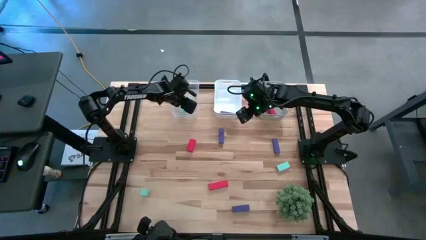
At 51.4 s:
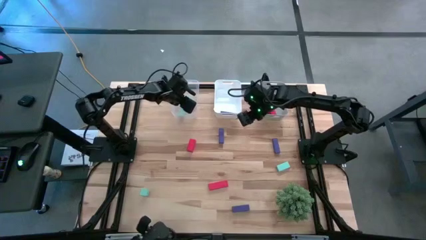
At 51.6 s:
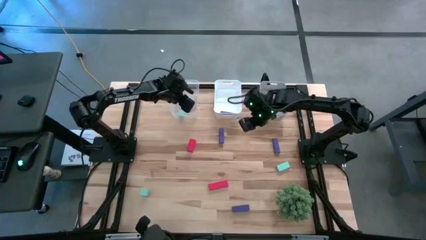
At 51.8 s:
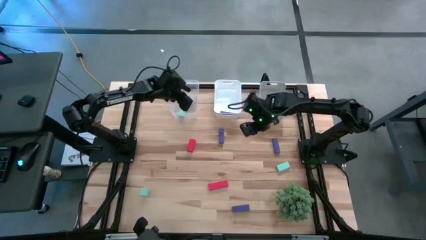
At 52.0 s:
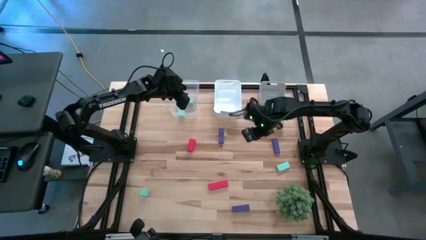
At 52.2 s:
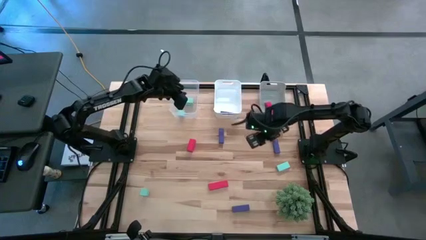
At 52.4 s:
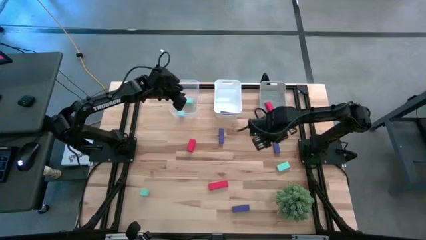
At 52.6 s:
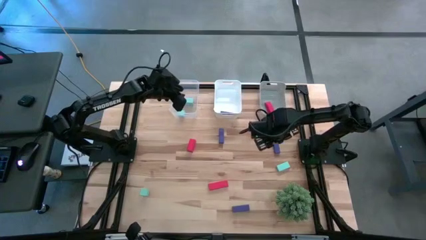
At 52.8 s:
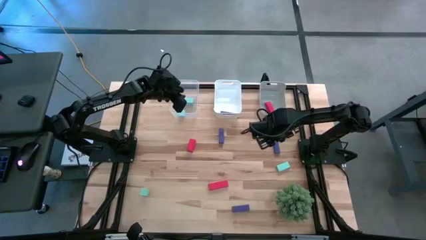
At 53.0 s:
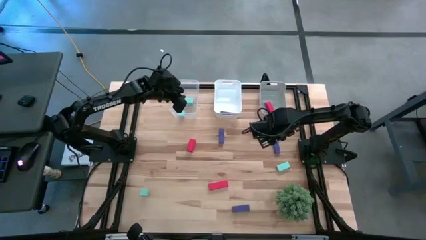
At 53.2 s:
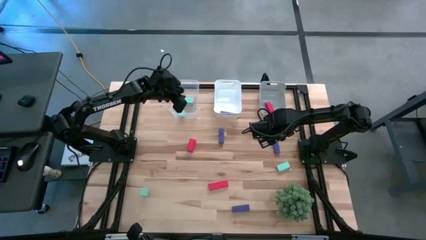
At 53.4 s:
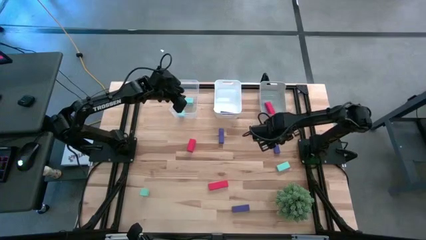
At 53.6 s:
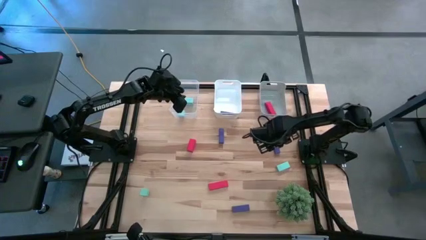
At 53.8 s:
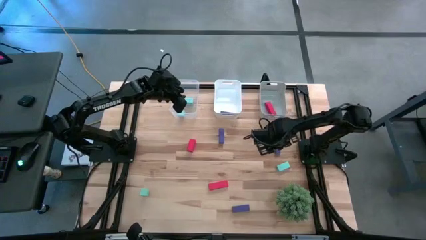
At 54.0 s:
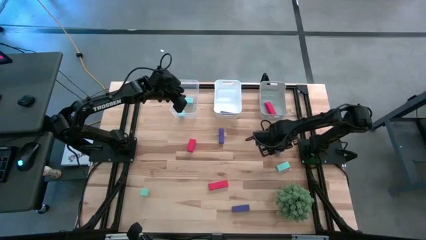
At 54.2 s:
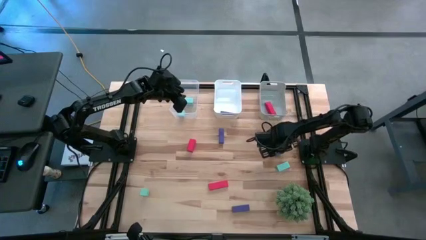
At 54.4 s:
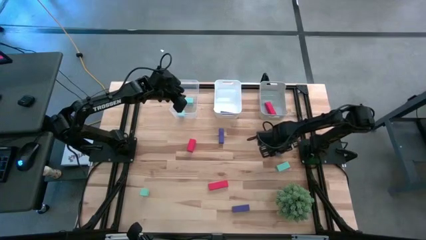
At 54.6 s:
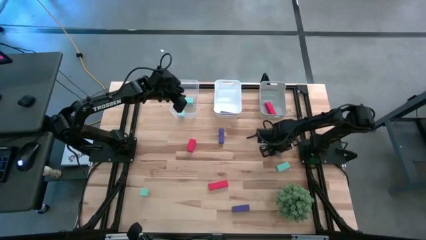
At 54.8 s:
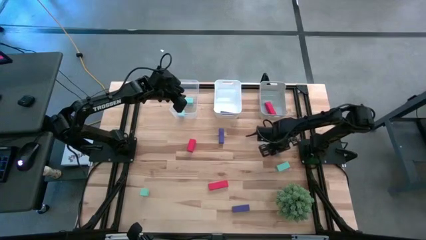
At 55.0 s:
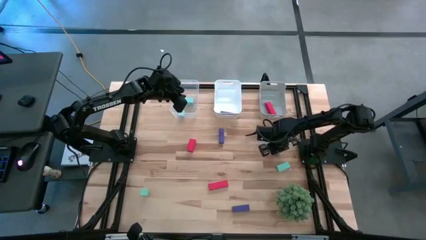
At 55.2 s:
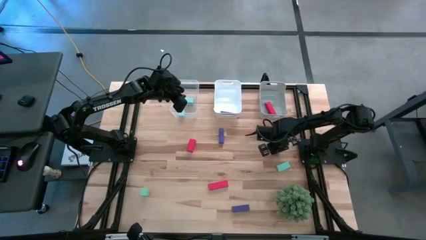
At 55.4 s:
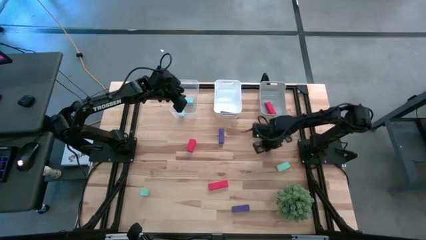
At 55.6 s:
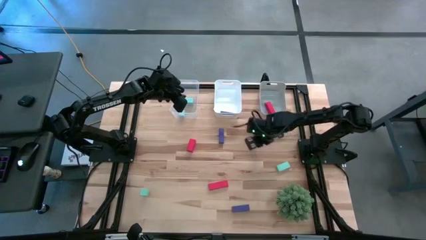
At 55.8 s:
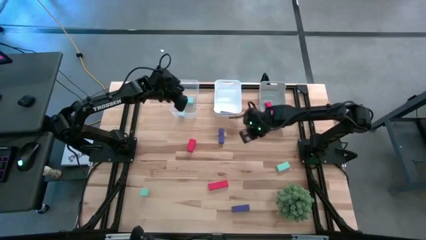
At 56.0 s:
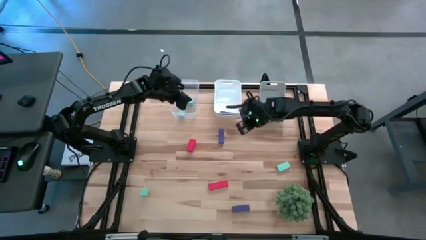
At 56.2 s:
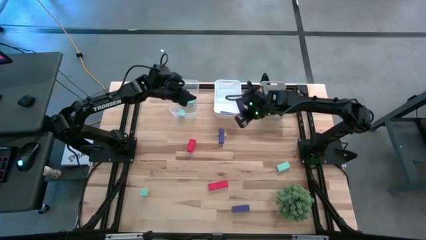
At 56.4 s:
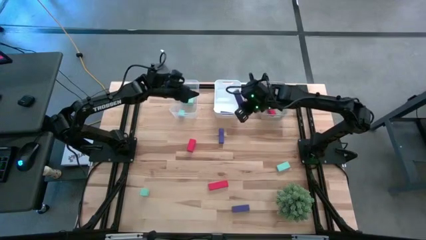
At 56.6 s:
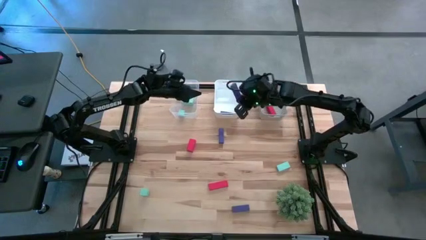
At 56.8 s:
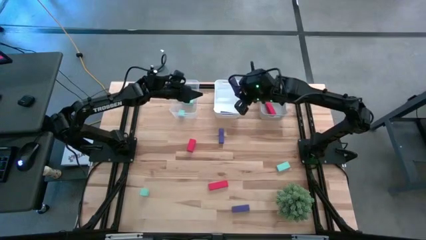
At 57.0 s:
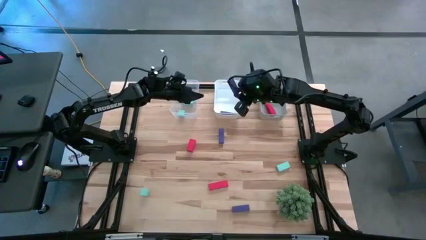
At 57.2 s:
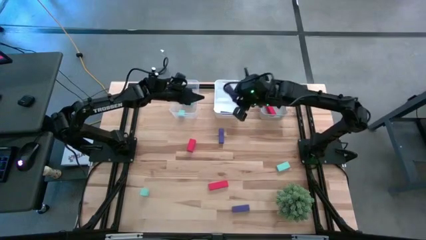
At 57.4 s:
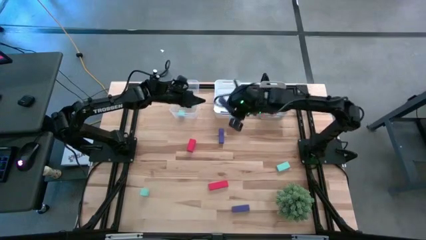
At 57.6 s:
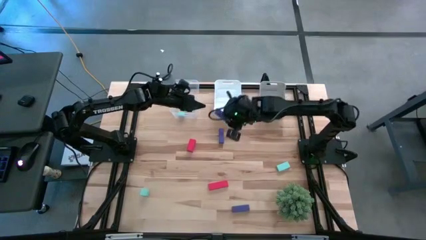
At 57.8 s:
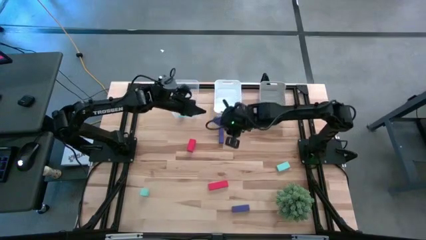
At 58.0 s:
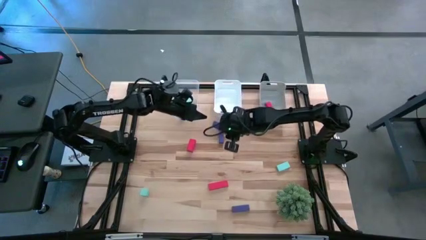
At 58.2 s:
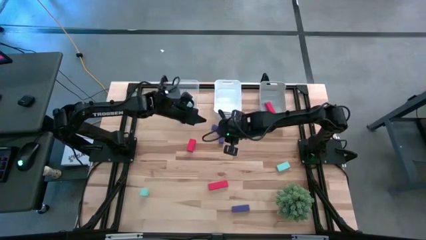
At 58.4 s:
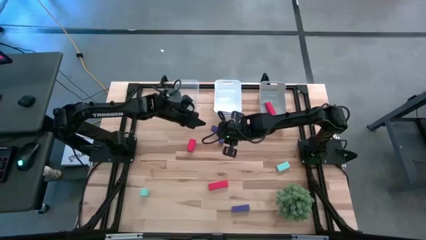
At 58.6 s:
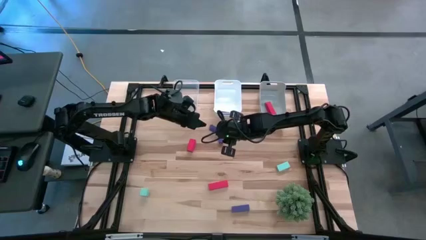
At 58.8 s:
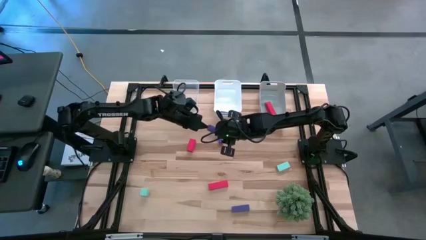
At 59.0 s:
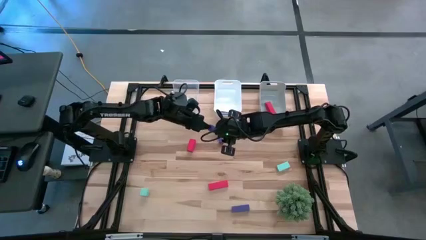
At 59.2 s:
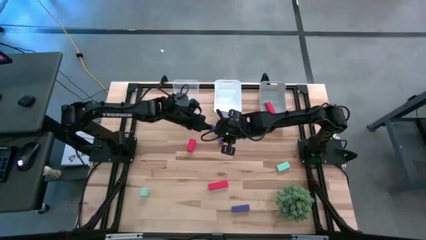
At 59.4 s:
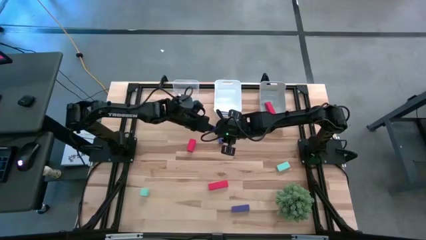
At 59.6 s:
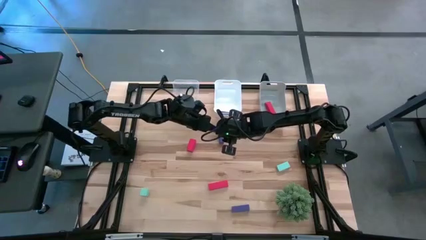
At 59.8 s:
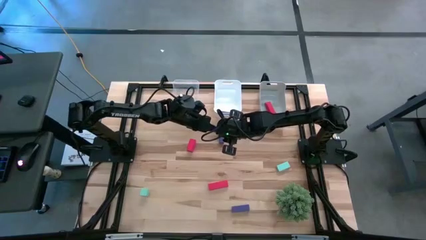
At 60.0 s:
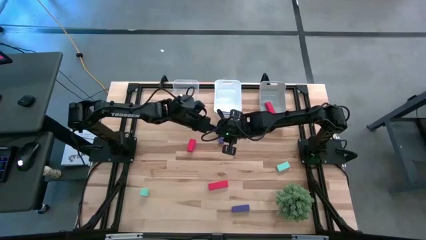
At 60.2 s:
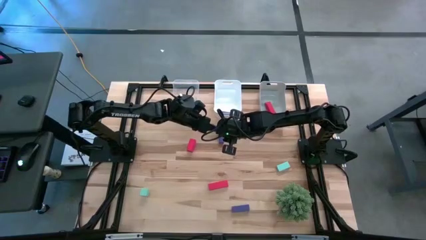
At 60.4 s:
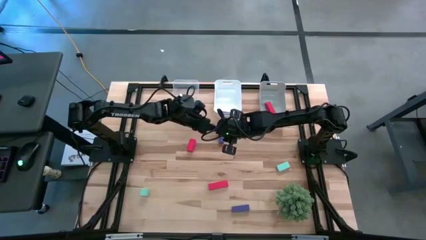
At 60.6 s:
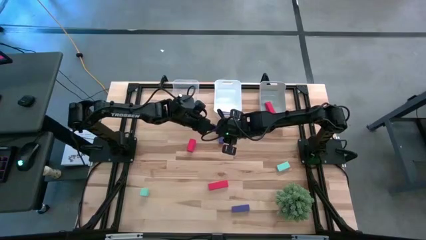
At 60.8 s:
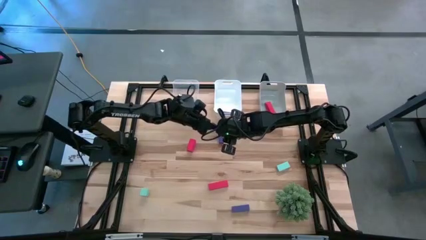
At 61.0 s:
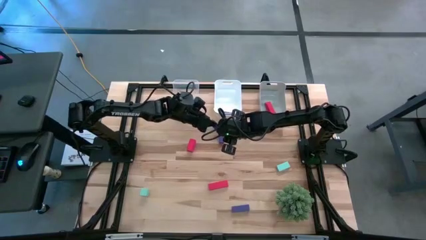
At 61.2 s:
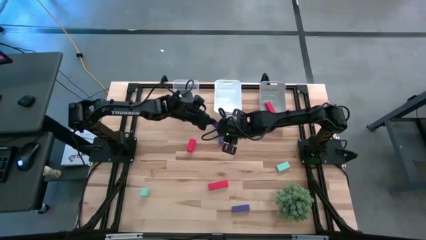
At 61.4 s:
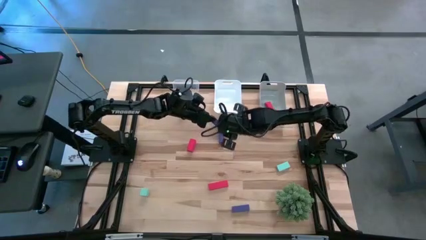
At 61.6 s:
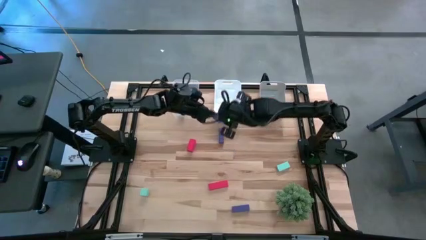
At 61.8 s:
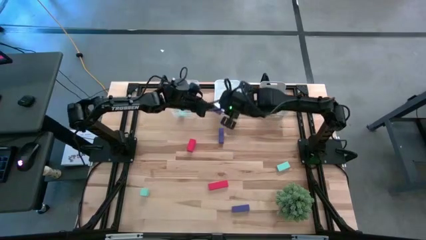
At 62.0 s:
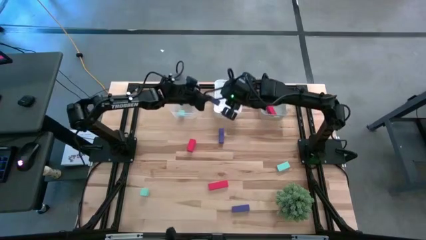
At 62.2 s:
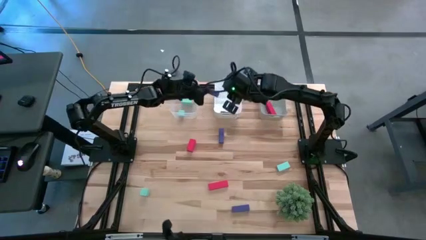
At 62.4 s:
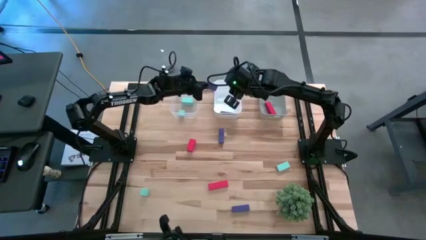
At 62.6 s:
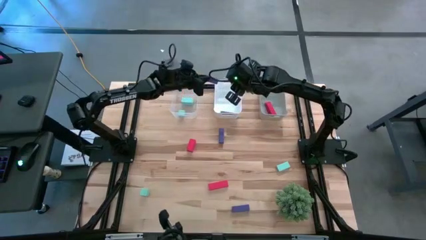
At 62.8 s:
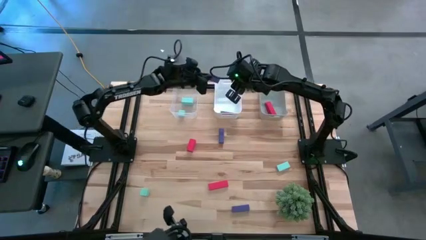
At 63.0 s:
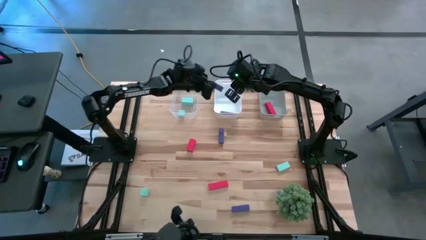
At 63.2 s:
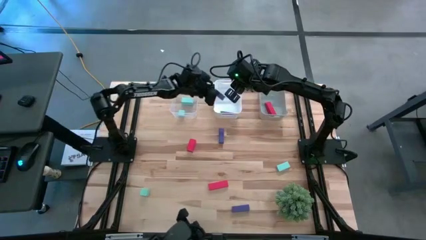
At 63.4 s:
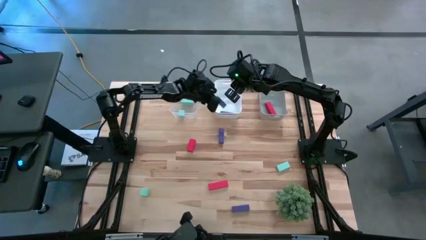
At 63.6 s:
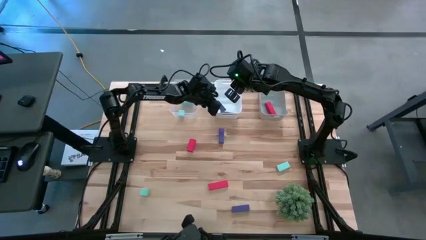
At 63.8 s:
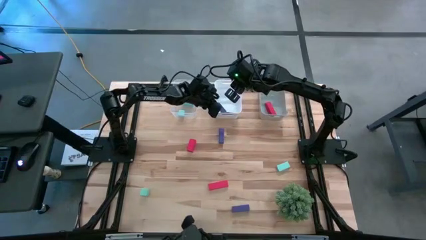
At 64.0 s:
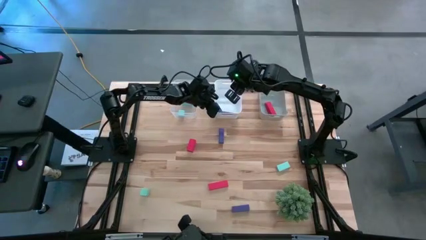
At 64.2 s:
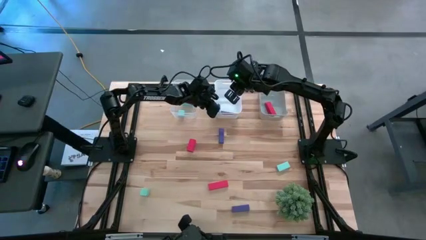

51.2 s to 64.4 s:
Task: Sort & place blocks by color
Put the violet block into the white bin

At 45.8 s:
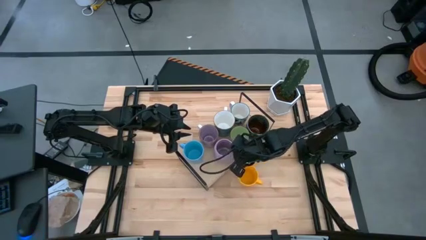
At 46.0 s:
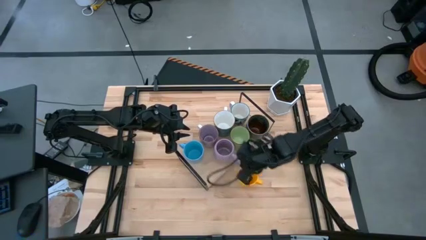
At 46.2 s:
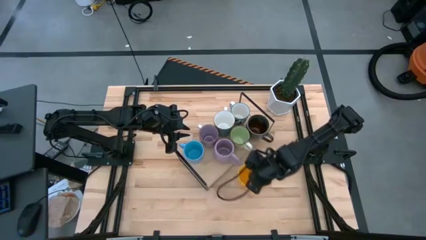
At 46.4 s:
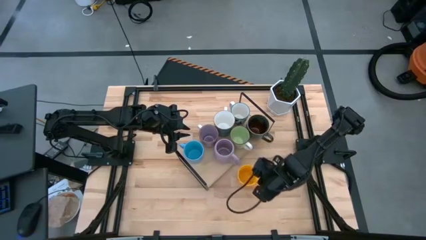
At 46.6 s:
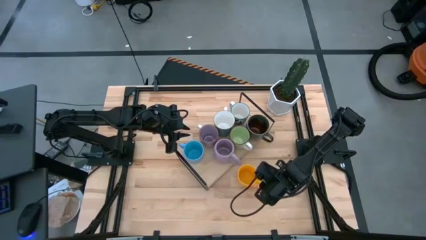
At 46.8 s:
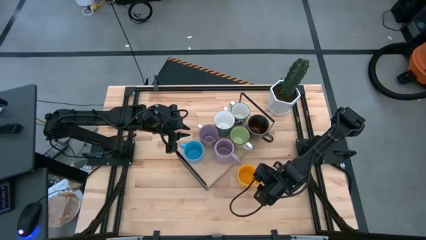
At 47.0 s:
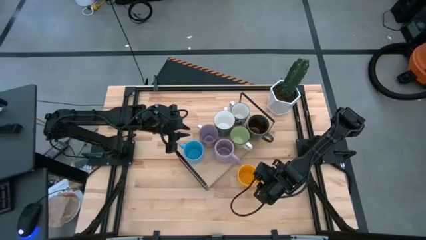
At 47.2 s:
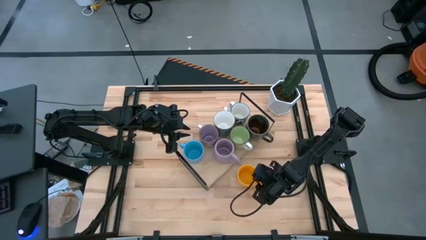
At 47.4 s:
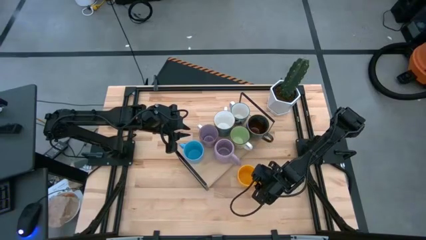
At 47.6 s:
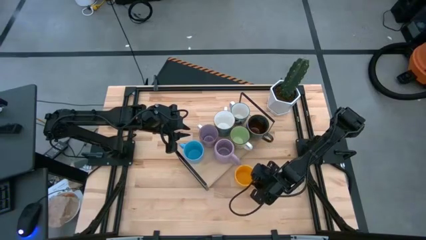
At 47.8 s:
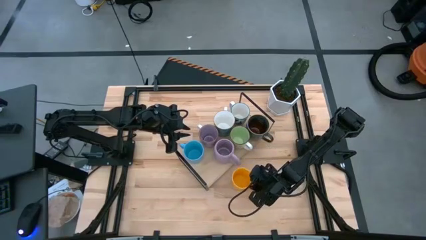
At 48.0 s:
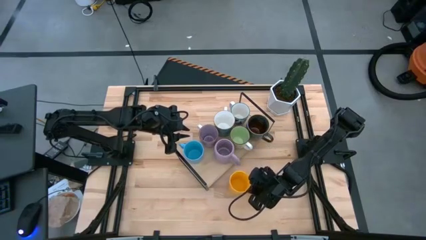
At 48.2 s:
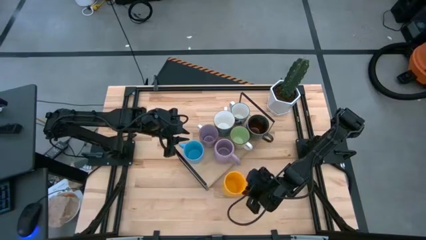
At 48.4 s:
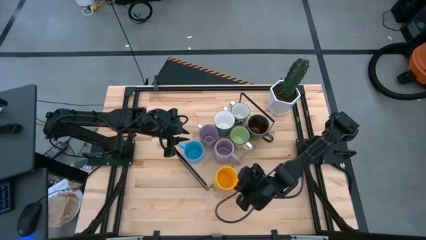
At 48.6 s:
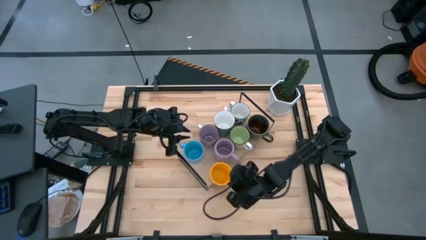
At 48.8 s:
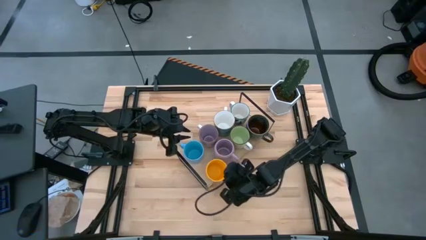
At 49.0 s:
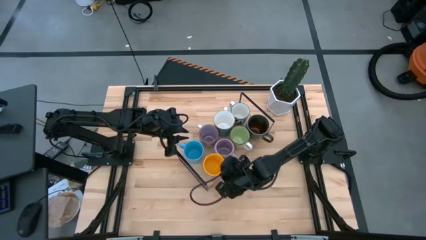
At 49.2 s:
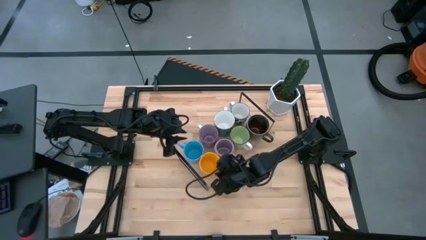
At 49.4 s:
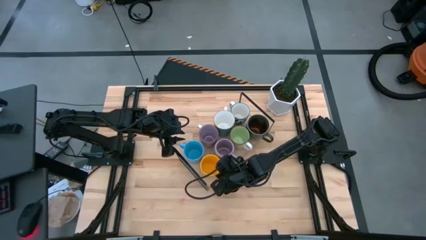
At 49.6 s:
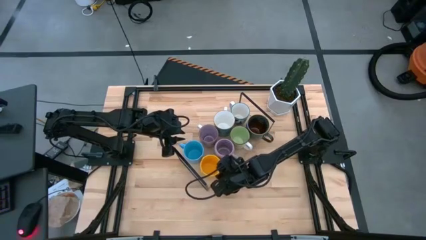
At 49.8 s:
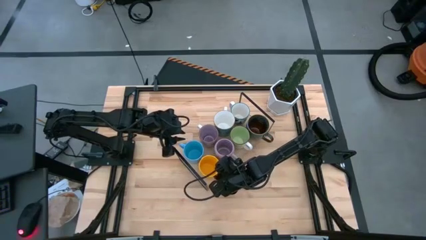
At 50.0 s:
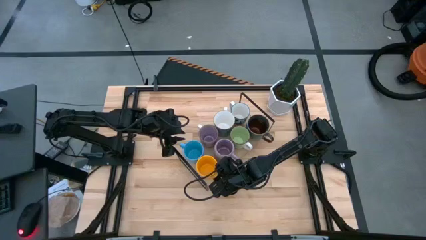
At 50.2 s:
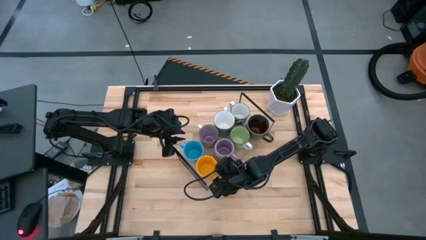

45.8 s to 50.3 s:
Task: Place coffee mugs
Put the orange mug on the shelf
